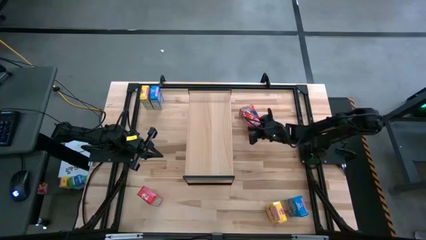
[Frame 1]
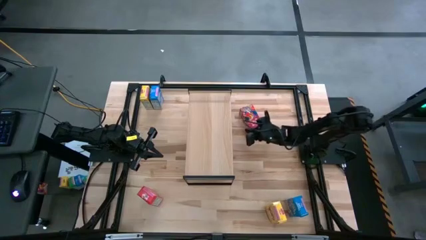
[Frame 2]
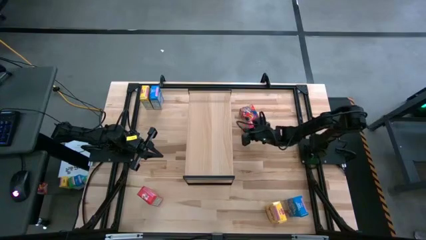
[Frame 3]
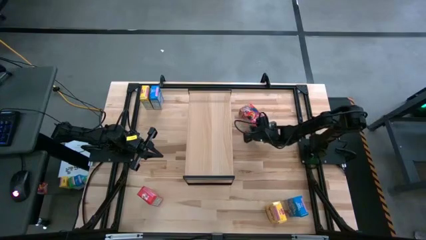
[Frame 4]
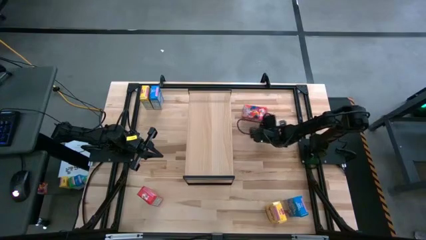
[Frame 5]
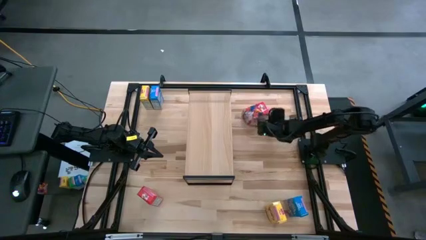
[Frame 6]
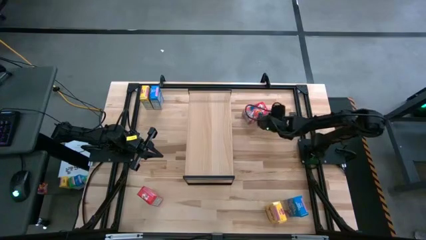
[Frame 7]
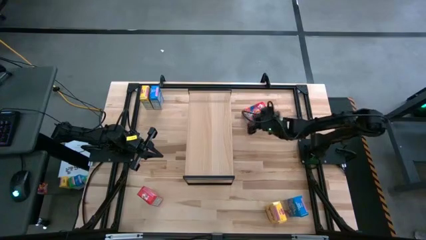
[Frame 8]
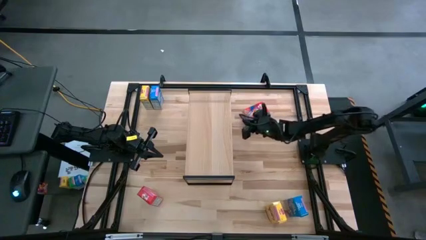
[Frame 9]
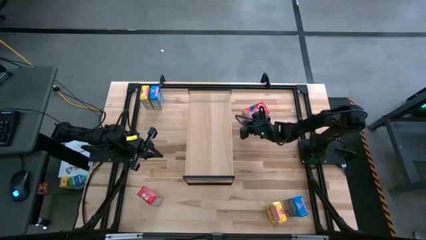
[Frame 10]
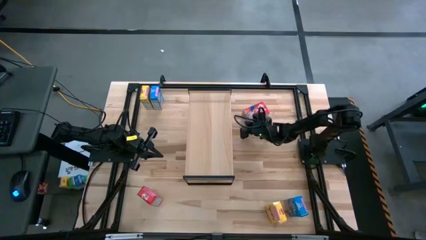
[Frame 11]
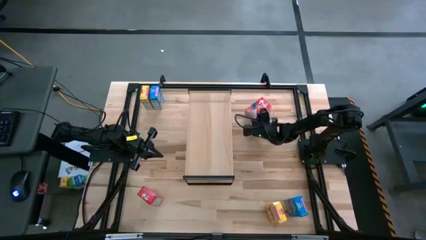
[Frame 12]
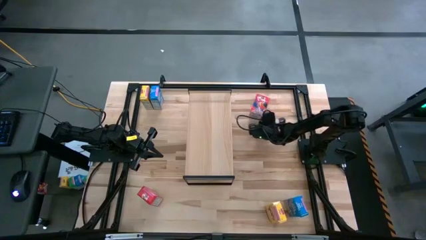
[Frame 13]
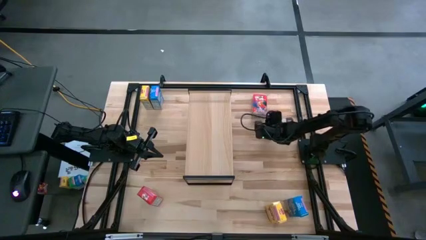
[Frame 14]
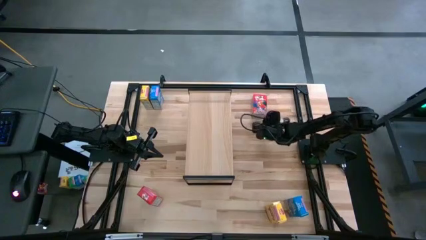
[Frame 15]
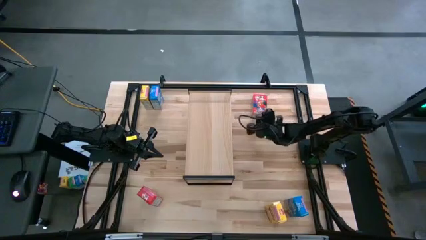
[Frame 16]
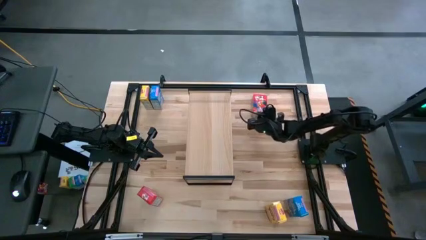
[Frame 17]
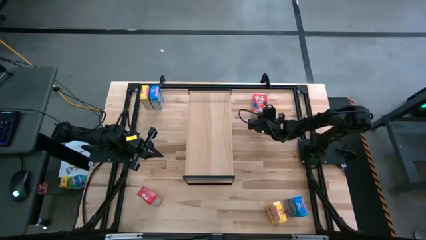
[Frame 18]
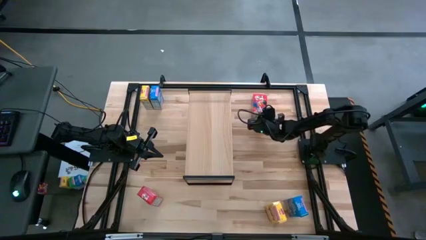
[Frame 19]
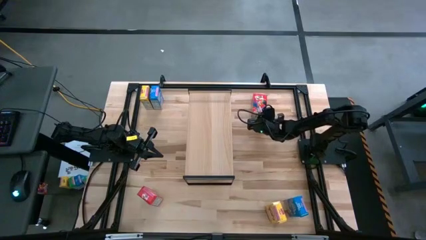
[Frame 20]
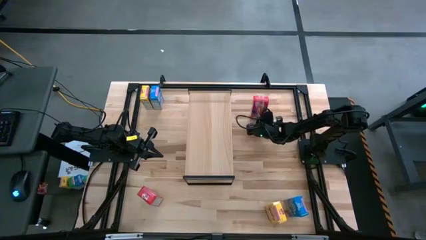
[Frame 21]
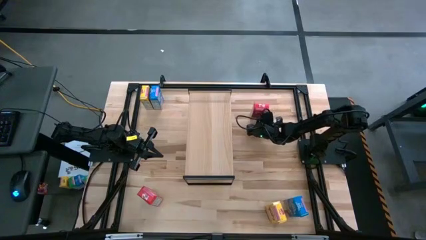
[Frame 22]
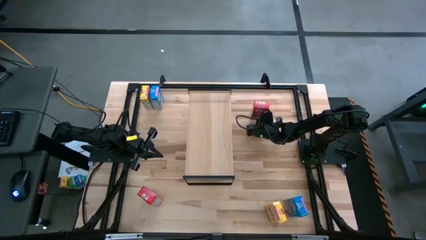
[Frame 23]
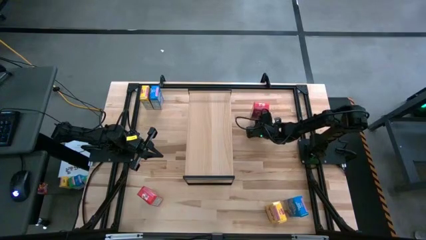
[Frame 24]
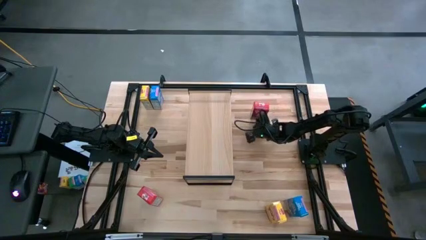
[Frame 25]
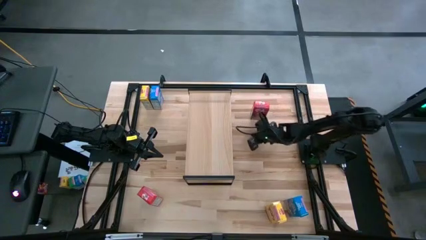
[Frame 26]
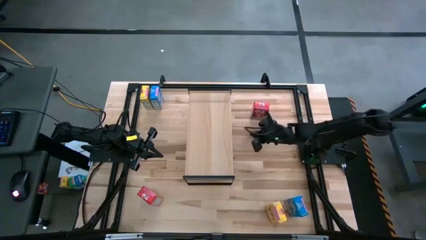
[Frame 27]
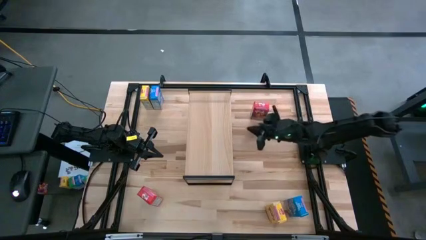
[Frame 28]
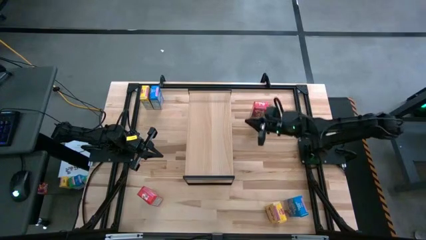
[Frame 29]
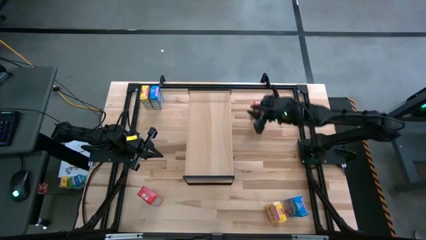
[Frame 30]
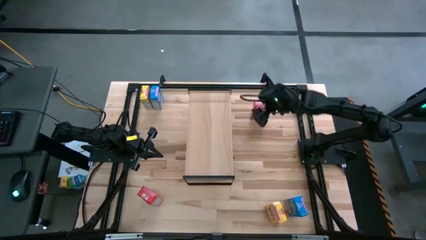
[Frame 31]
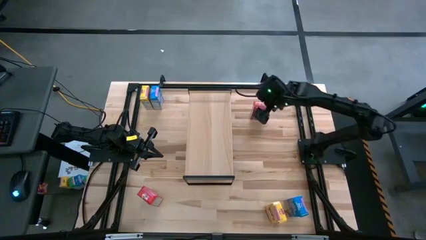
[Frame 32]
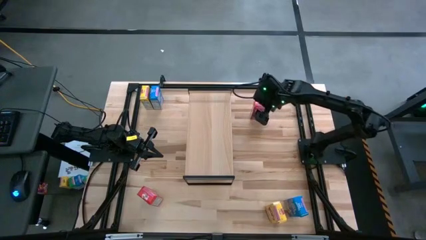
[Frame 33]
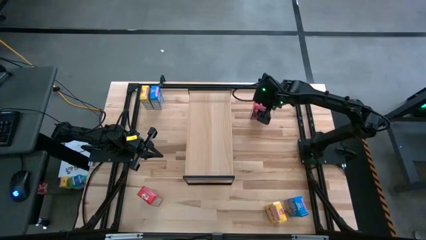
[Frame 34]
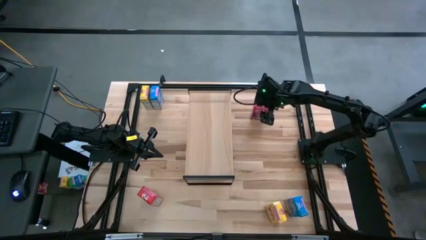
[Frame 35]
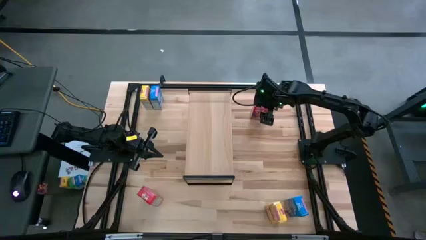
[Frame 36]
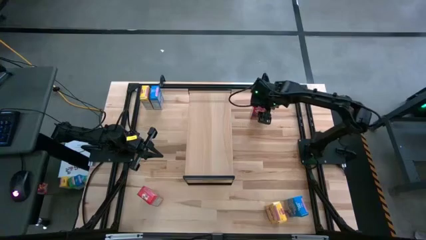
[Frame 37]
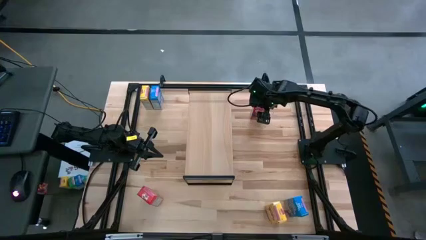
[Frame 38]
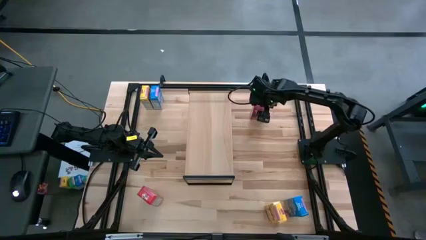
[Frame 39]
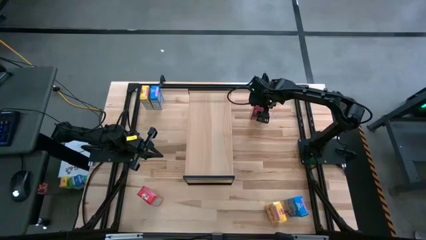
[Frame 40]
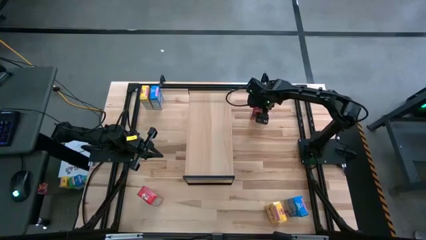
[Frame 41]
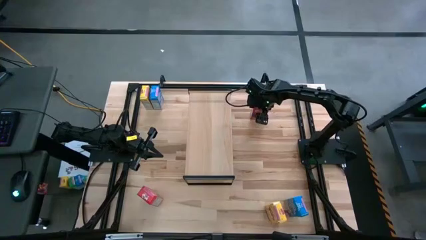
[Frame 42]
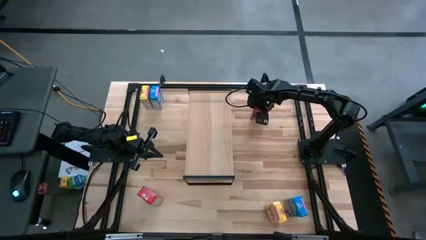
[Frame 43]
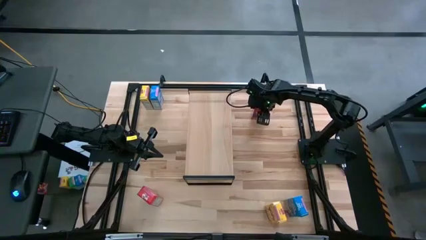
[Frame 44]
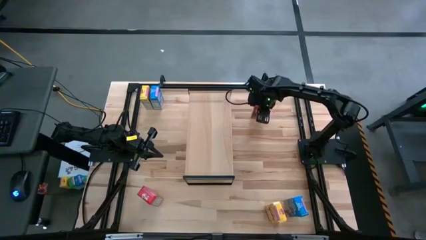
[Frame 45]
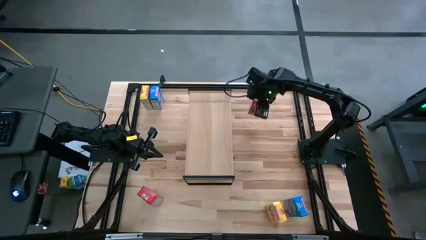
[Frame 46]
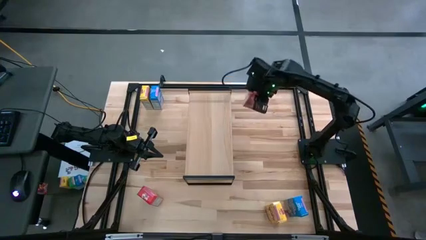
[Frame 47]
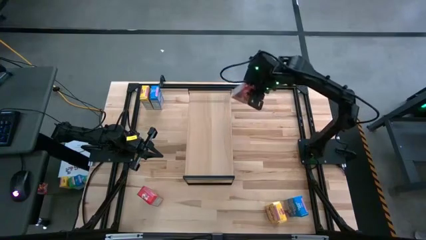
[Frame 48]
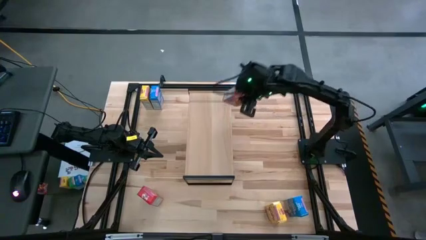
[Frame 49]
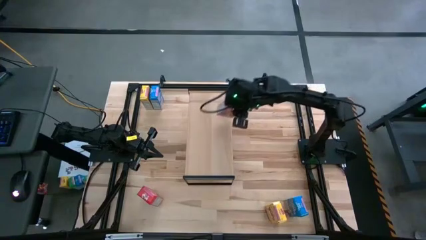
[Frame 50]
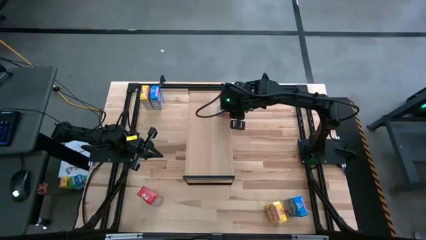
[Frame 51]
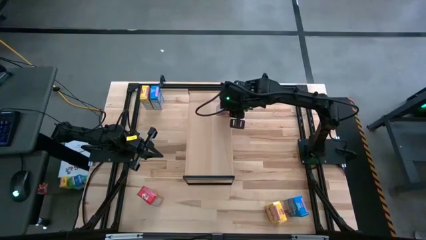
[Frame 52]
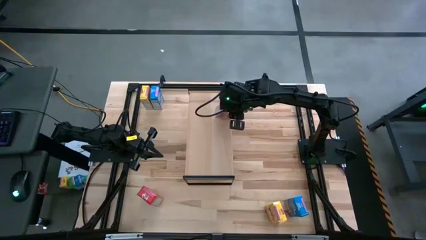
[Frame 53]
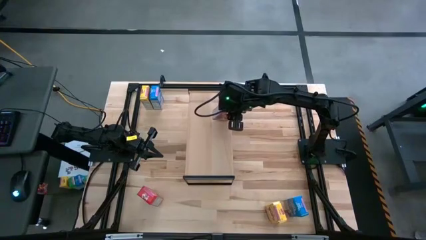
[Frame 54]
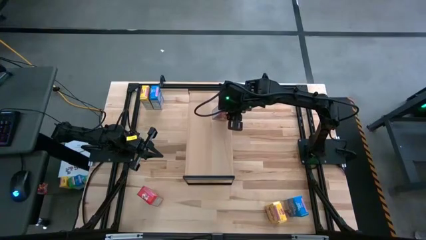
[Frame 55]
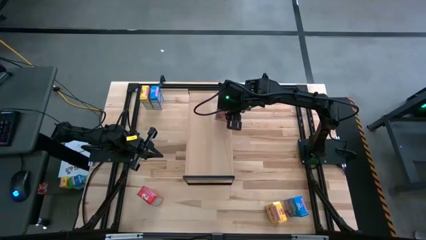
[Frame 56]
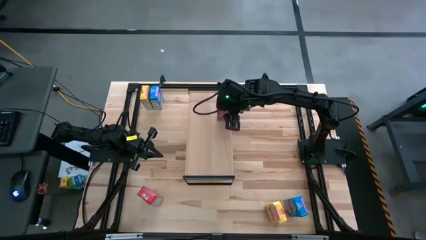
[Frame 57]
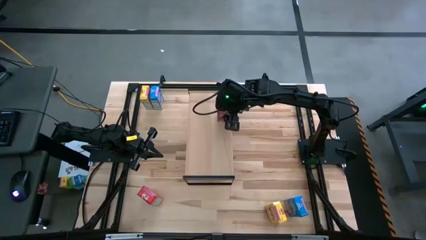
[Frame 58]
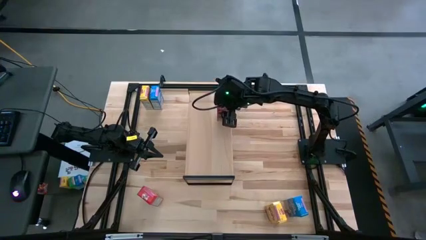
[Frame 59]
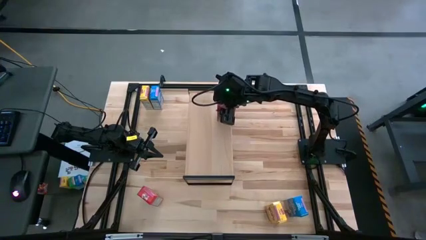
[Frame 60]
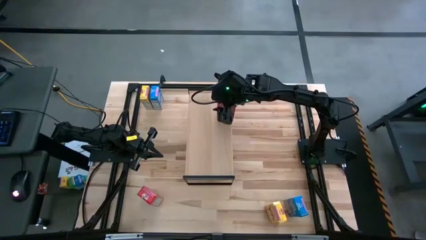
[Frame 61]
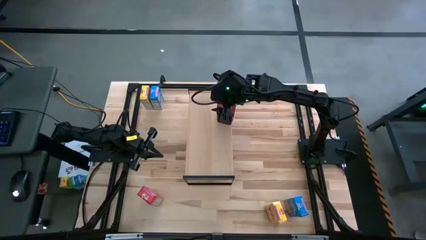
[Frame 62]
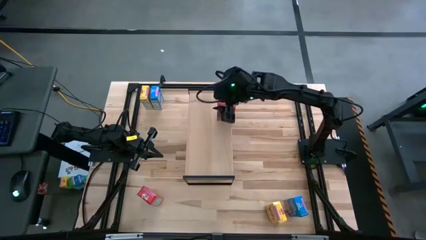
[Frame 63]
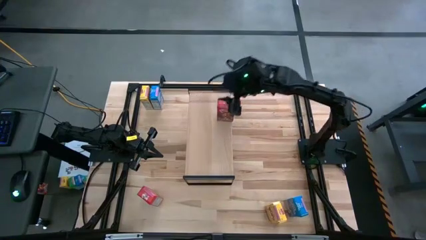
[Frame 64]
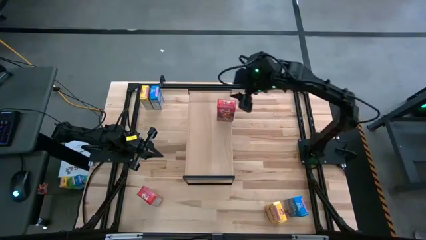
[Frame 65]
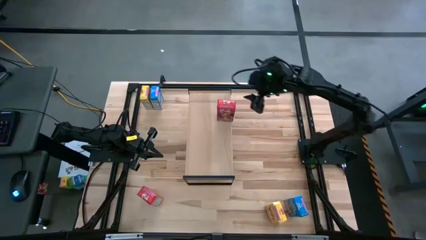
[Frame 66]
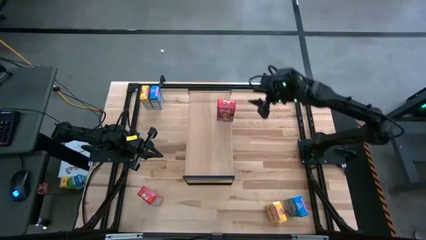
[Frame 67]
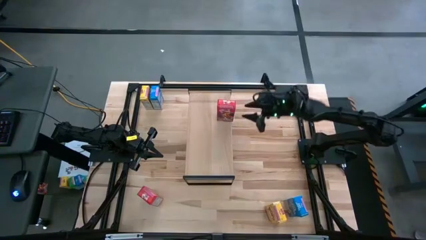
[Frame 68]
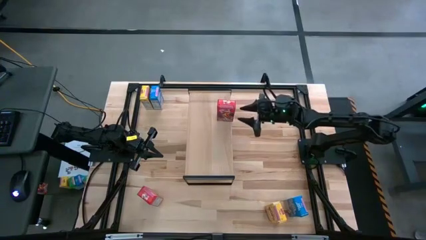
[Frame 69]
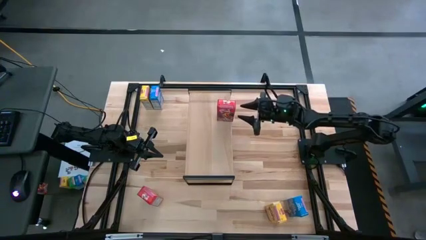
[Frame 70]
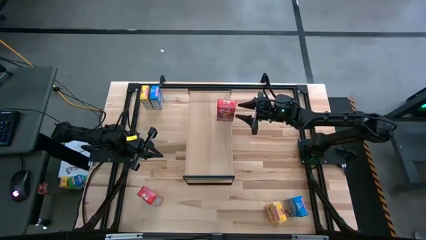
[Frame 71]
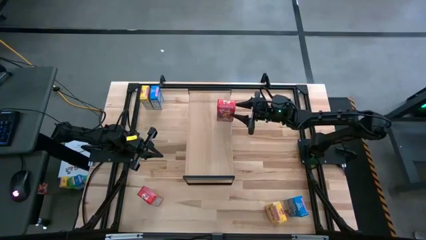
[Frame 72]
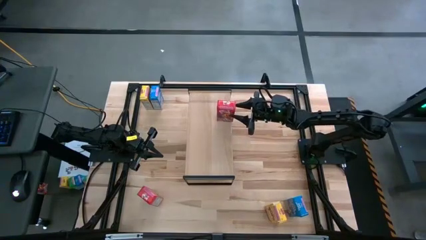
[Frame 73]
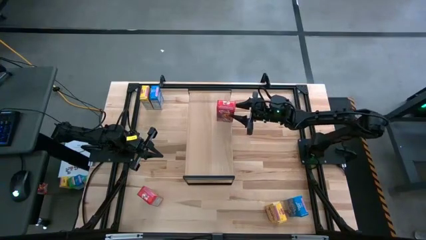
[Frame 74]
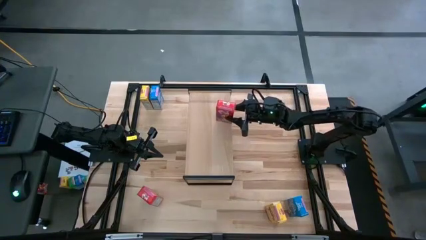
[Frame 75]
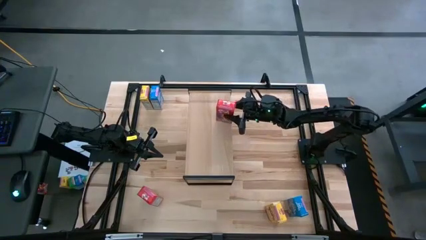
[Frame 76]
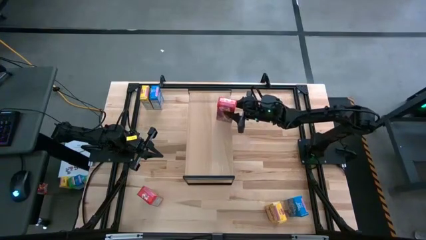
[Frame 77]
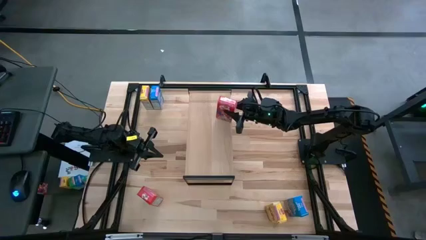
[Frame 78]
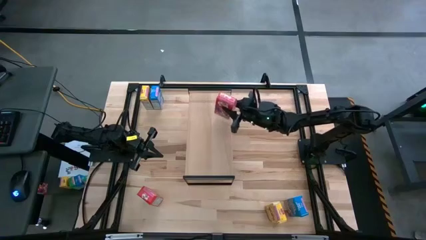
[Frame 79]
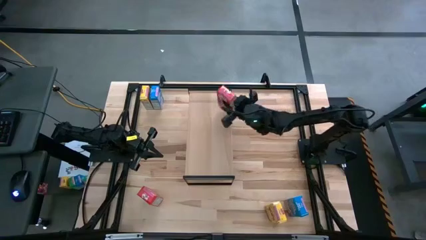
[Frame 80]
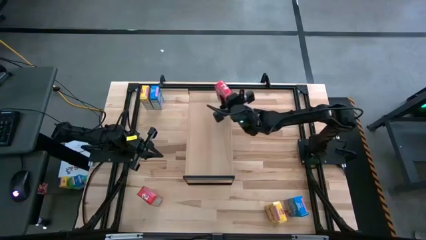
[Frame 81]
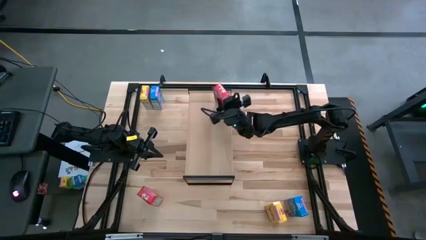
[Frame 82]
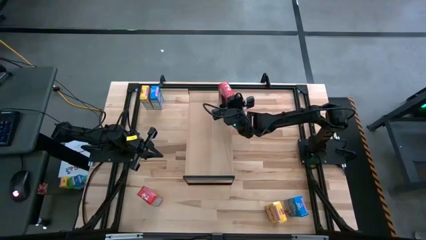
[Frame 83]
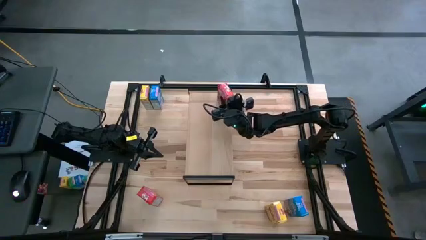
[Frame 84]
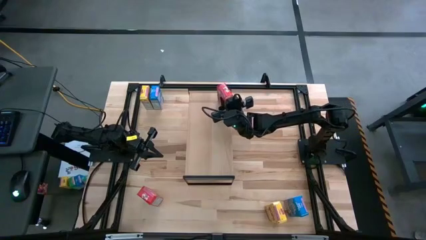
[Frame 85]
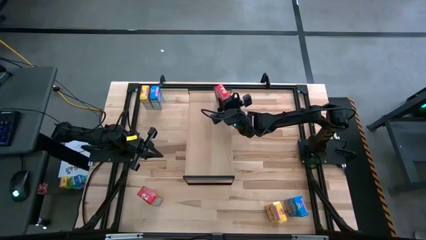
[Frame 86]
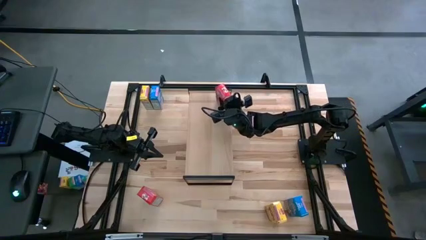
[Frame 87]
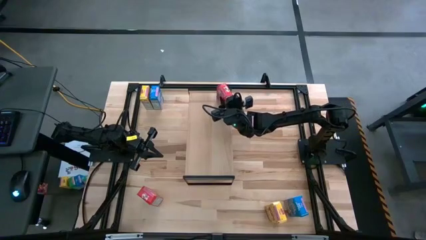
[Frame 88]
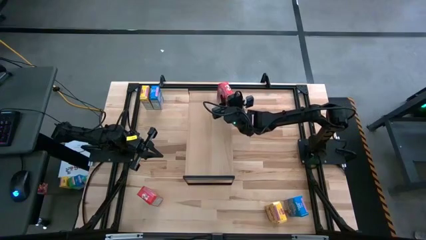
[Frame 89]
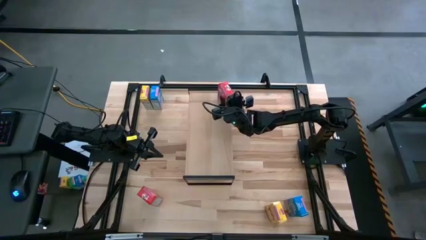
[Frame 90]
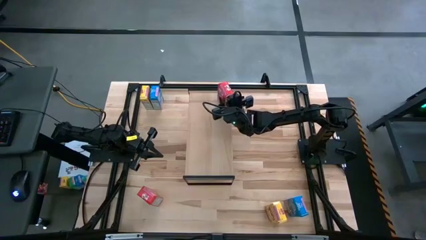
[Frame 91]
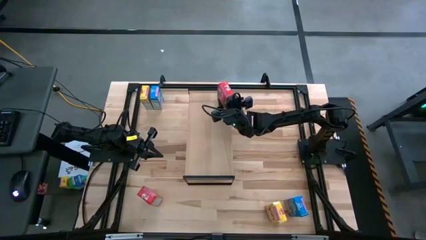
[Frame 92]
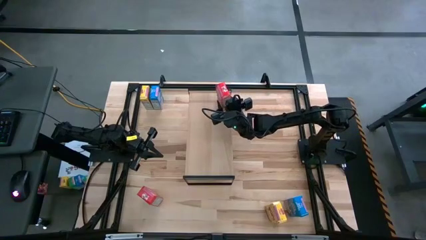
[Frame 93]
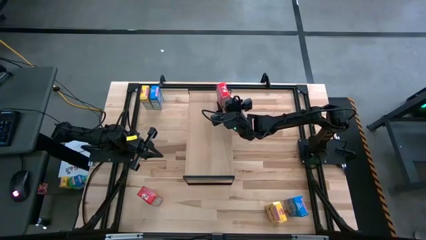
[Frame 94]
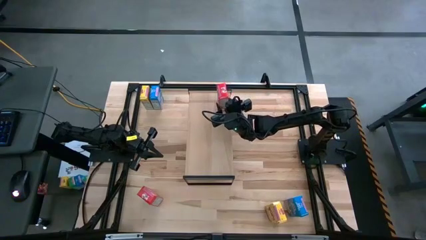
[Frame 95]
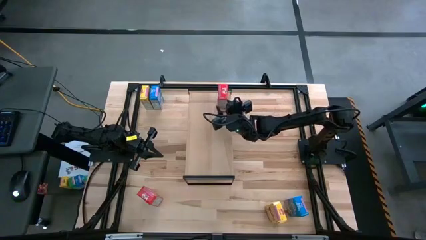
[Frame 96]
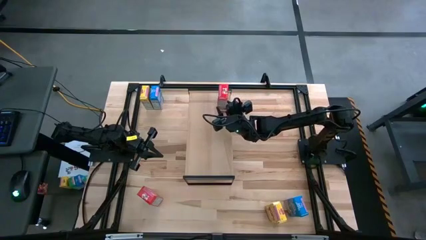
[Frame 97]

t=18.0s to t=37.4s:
Task: Stack cereal on shelf
Put the top red cereal box on the shelf
